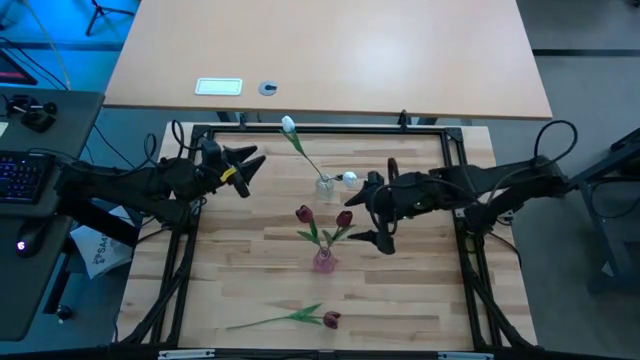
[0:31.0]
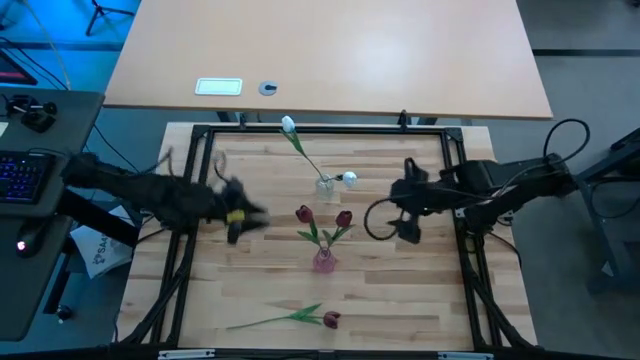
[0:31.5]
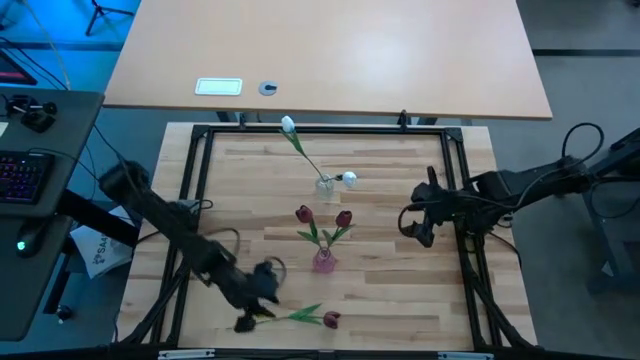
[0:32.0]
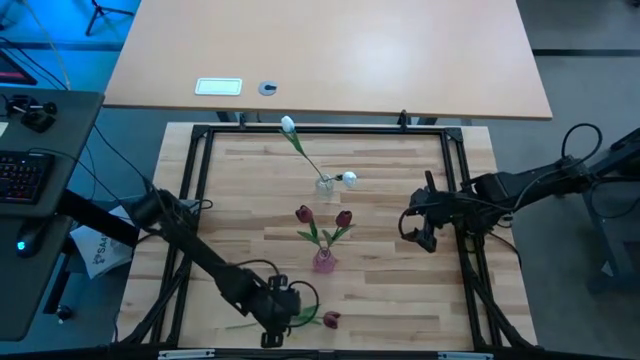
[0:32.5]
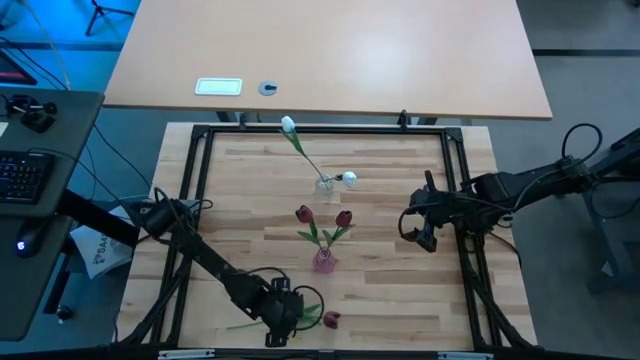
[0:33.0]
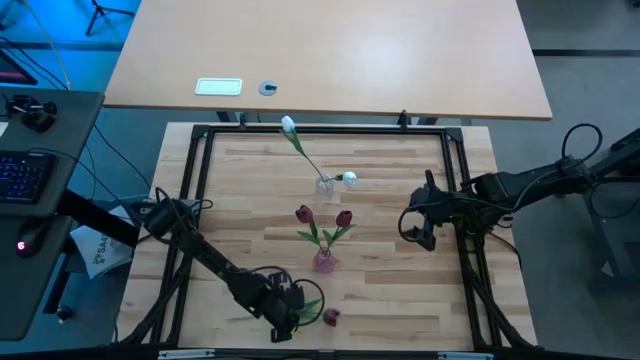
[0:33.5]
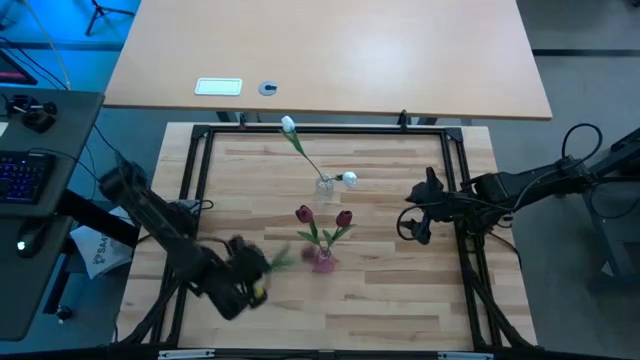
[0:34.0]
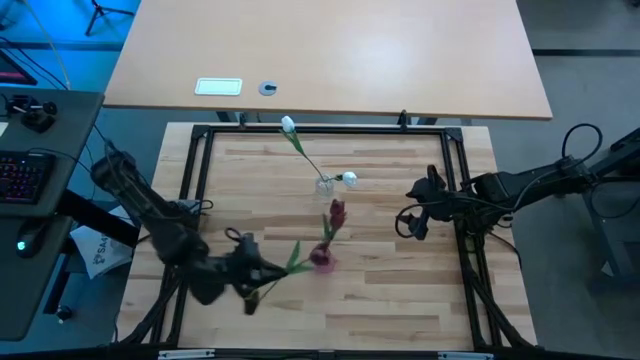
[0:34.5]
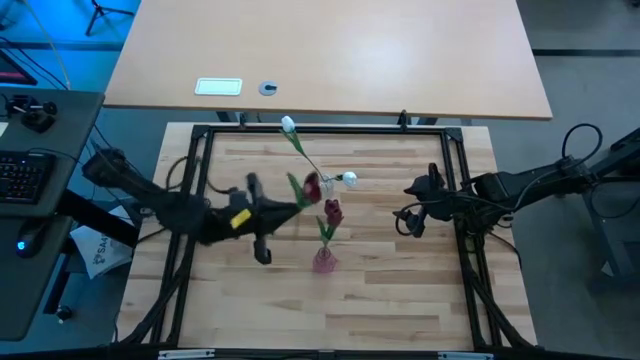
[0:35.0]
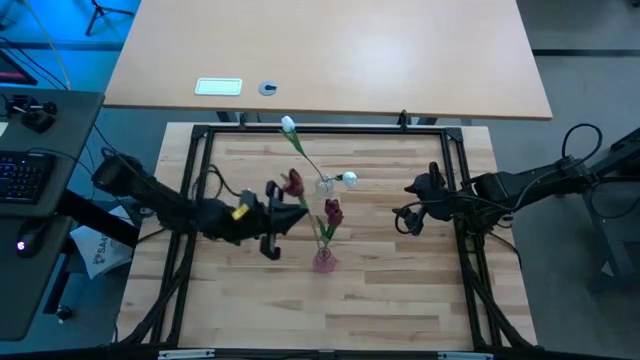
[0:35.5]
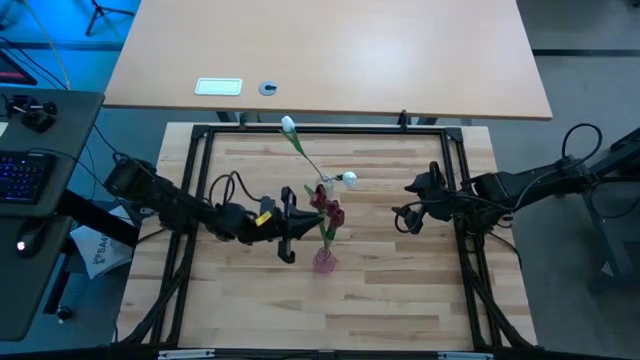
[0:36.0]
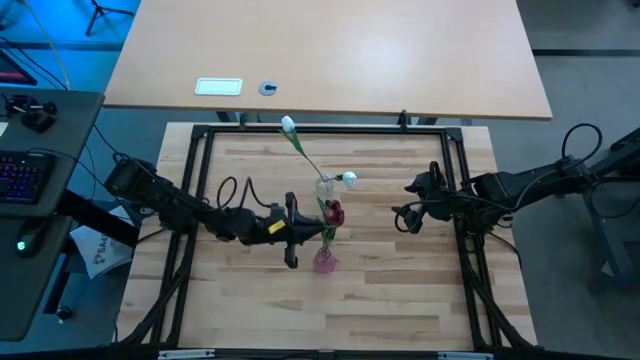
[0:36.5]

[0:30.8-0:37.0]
Task: Sort flowers into vase by color
Put the red tulip into the pink vase

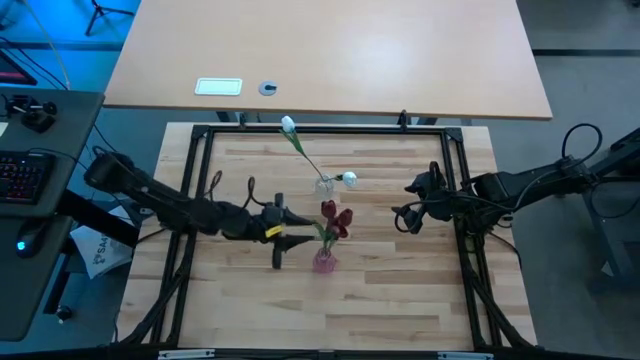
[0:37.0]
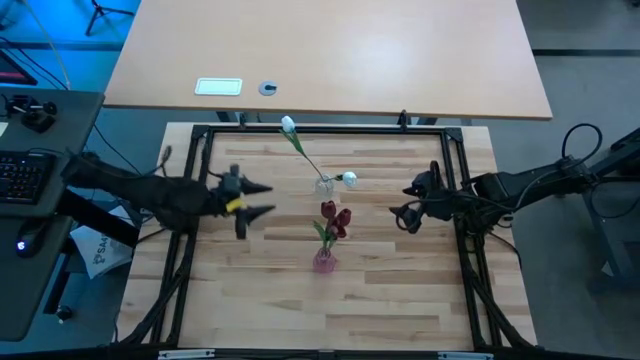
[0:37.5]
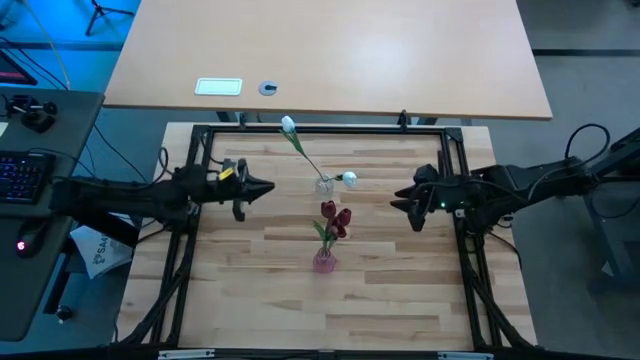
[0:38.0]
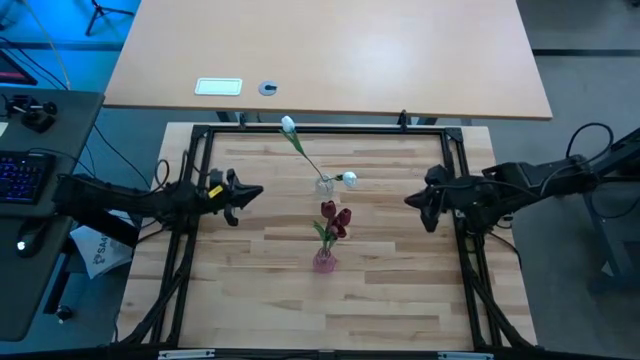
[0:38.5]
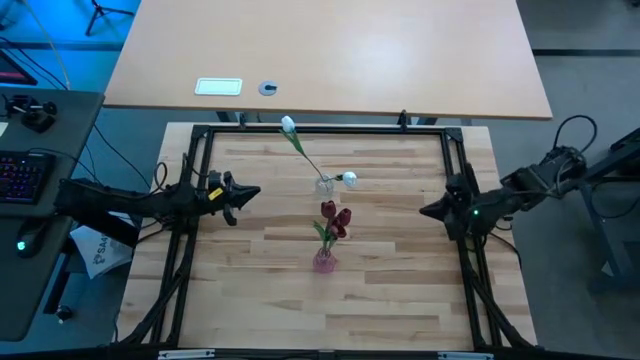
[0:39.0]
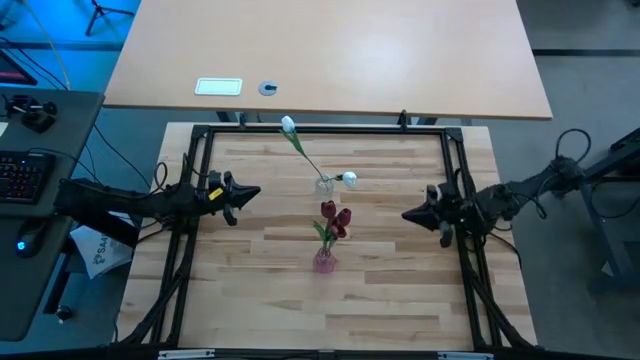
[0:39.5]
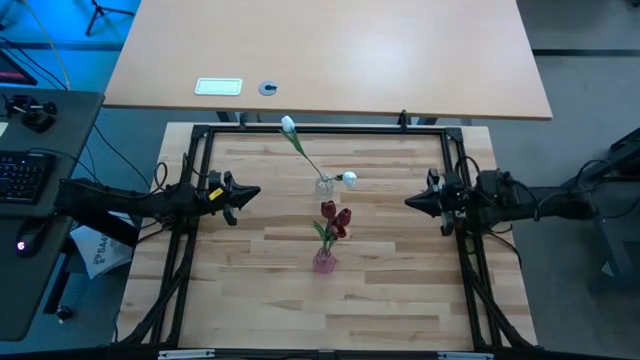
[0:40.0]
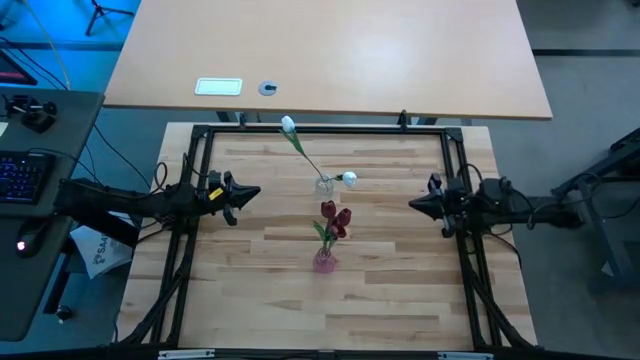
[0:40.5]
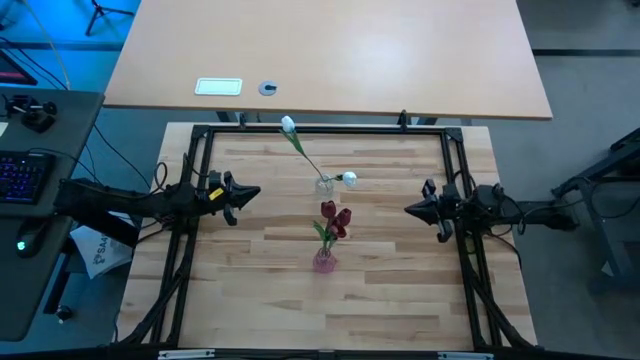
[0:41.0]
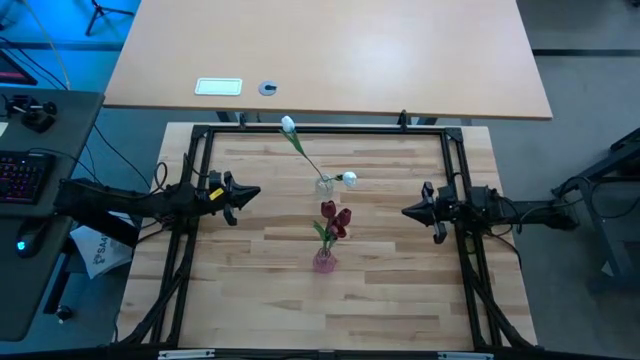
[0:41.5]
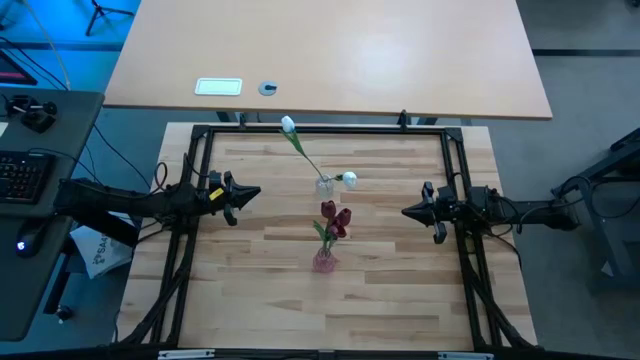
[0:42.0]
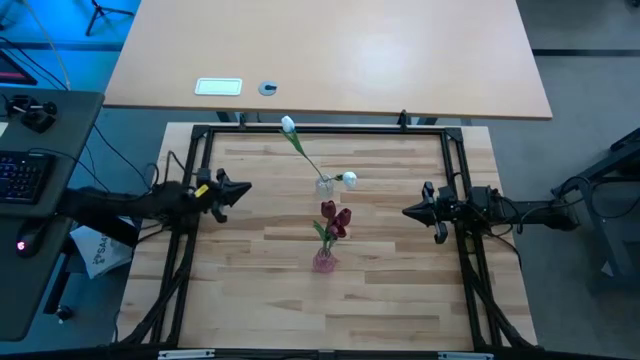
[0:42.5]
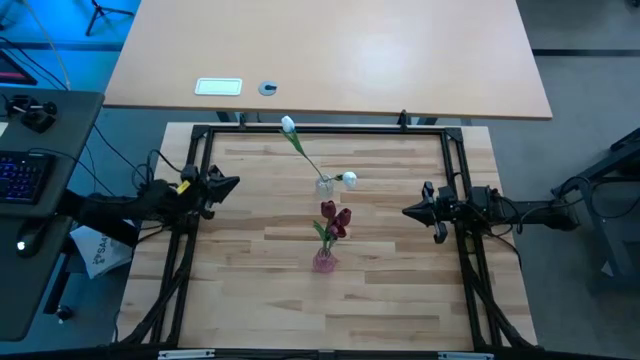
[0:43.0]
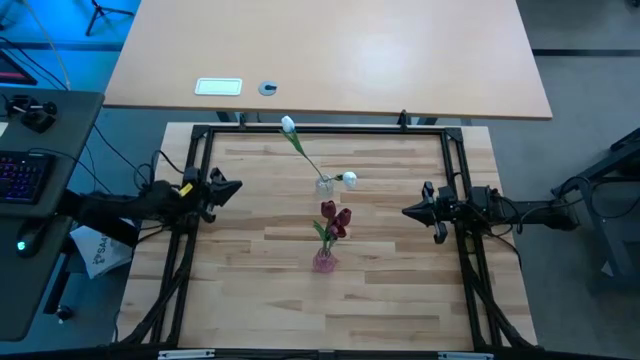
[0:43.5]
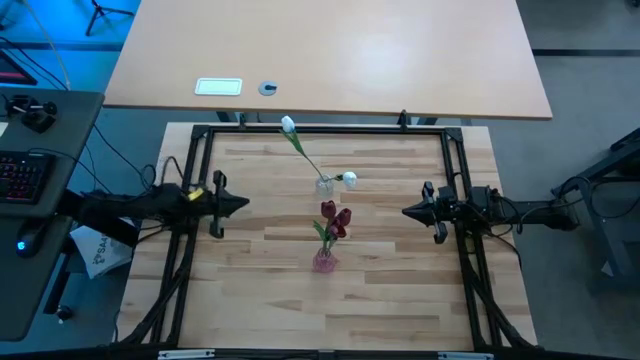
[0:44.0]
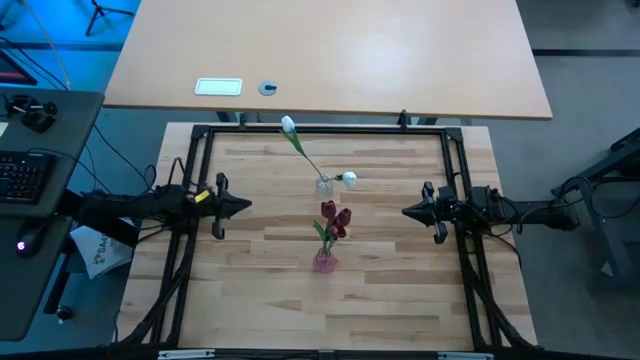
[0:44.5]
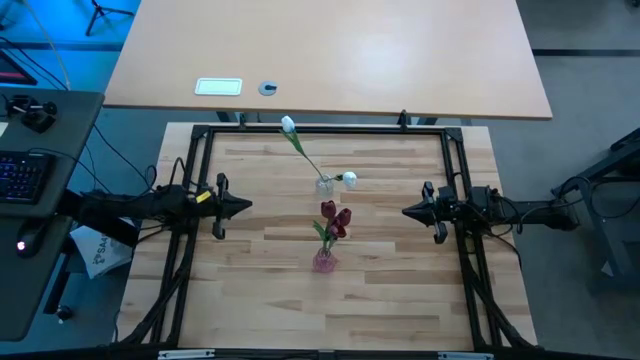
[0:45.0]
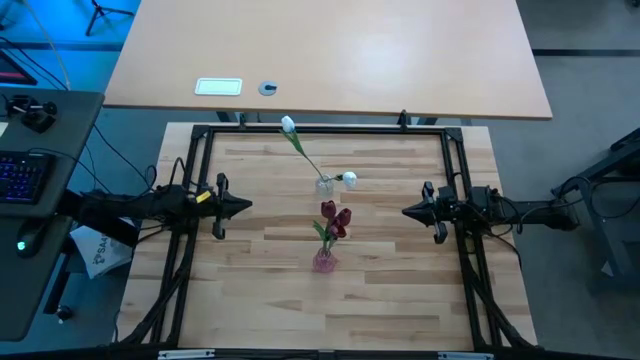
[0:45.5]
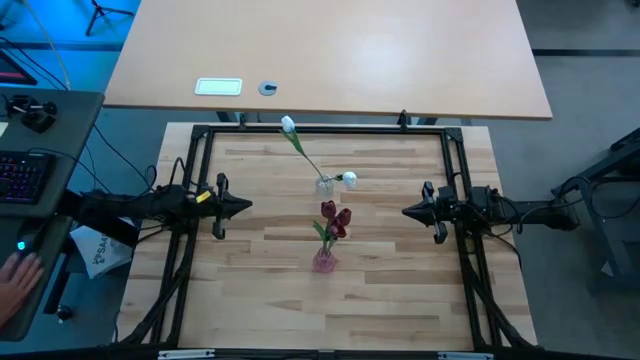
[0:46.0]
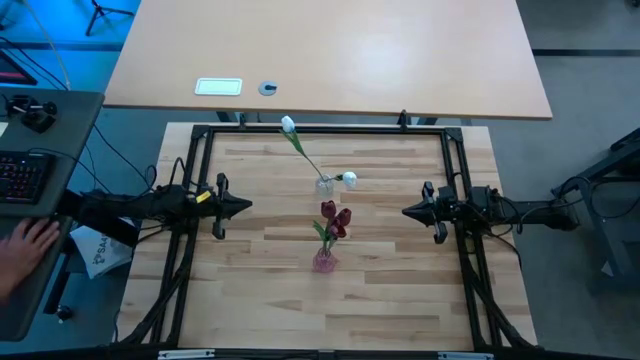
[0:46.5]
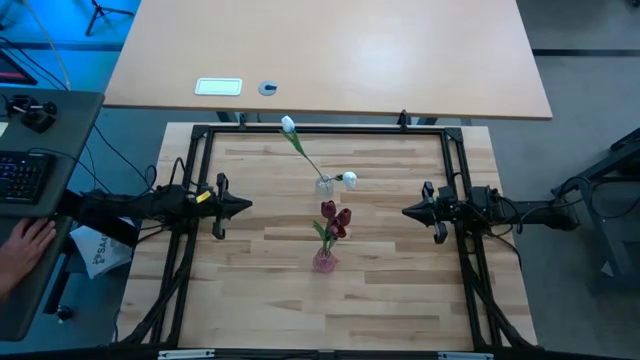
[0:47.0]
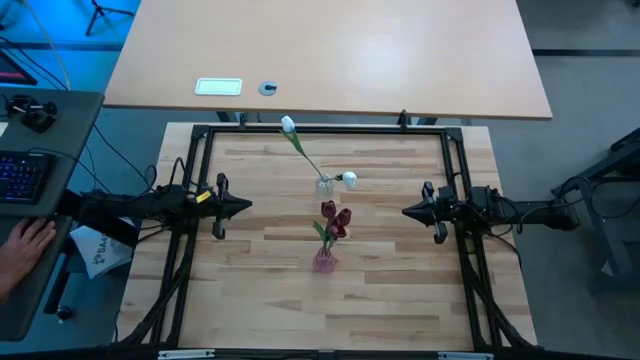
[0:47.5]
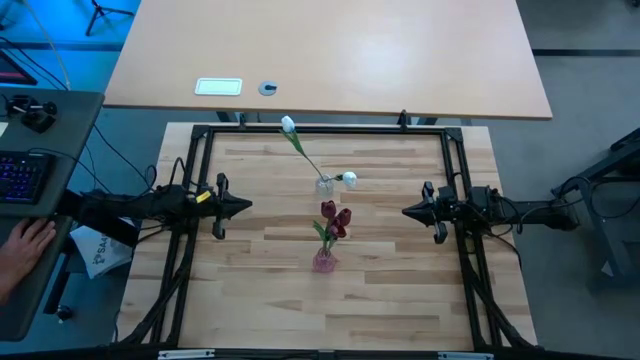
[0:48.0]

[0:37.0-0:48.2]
Return to Home Position

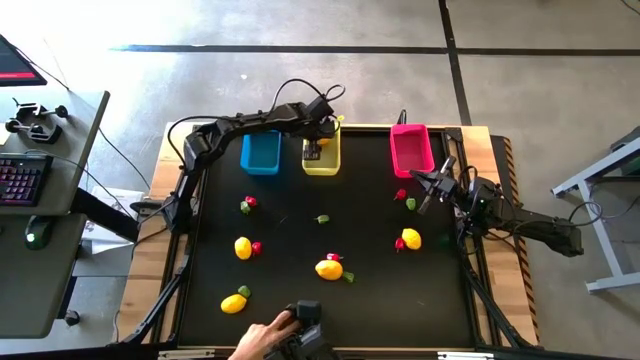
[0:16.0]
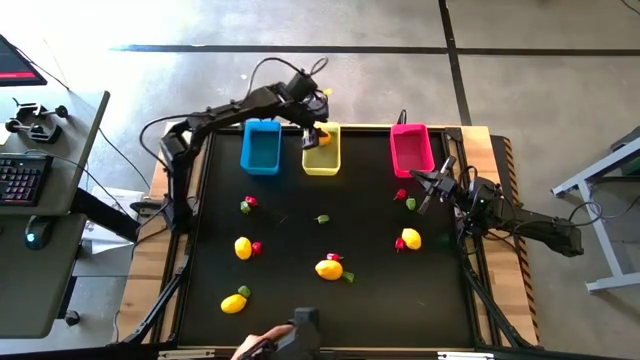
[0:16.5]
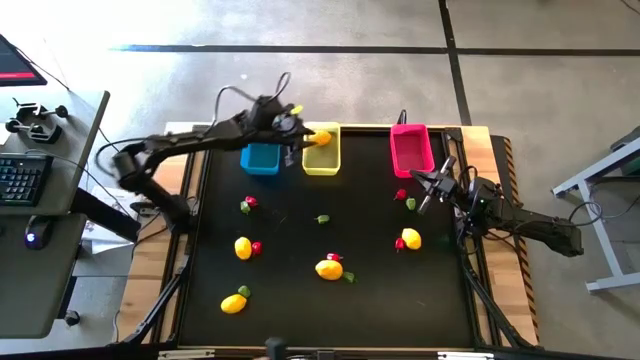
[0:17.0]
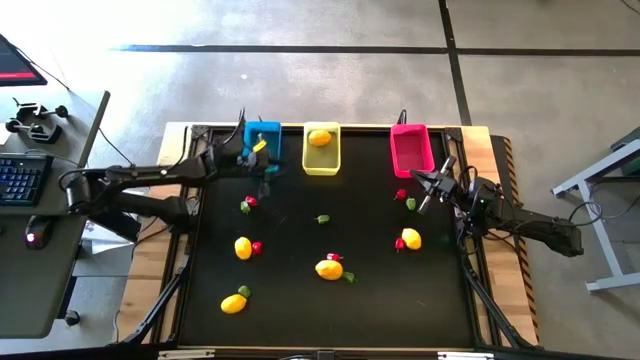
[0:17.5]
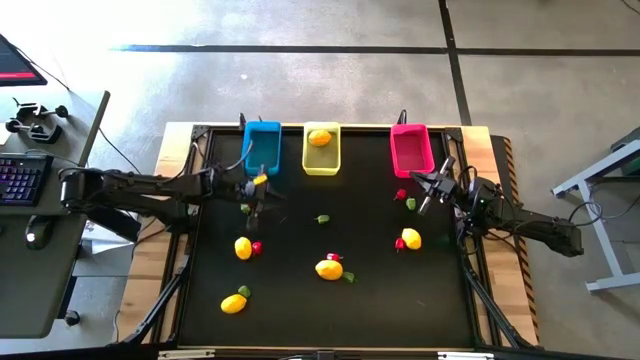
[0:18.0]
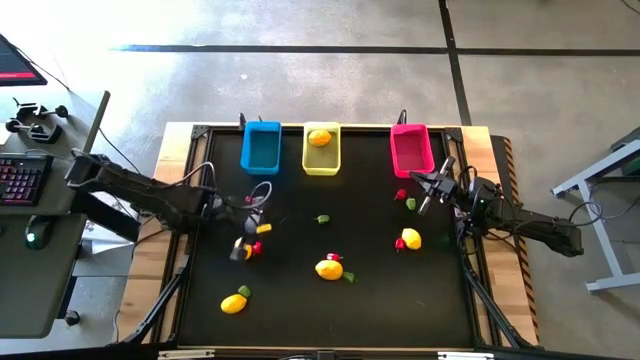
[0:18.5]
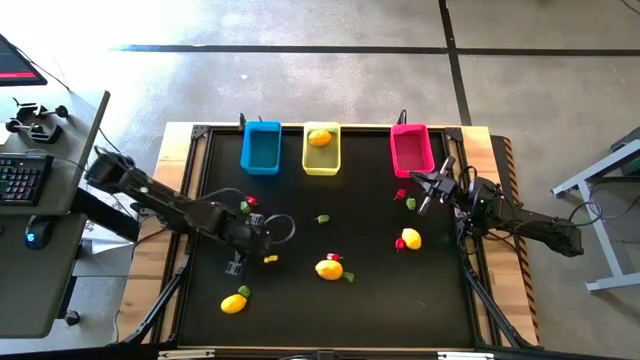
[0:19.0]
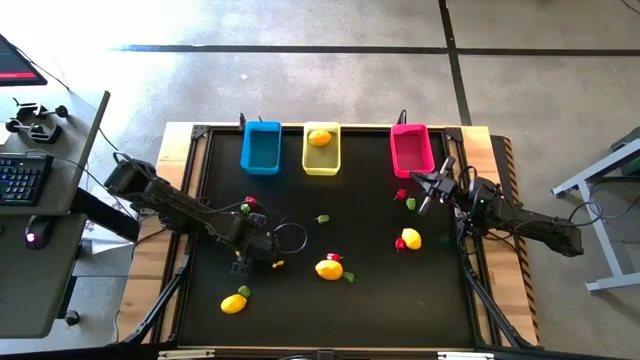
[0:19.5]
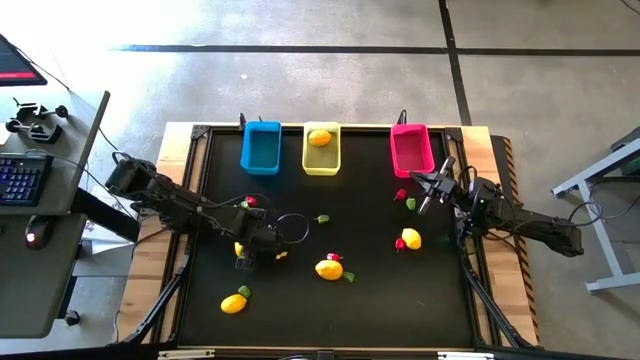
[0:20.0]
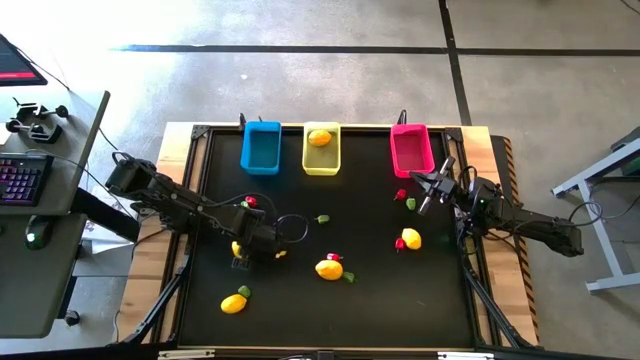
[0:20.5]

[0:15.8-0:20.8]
Task: Sort produce into baskets
Put the red bell pepper into the blue bin
